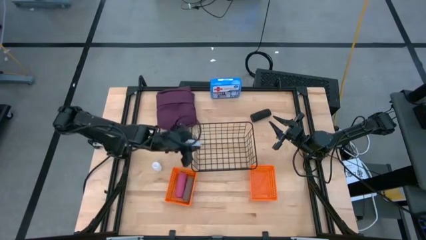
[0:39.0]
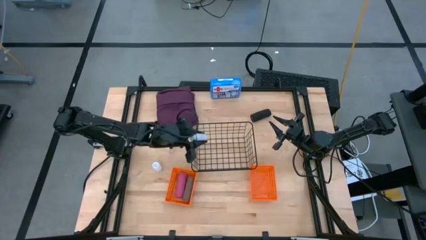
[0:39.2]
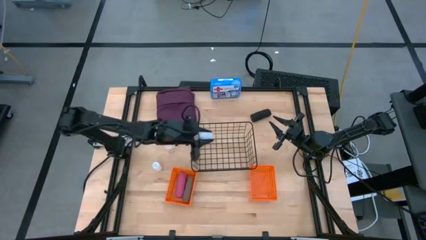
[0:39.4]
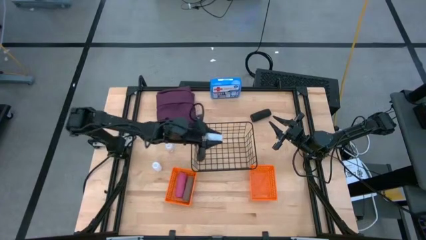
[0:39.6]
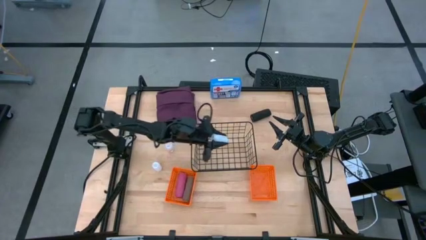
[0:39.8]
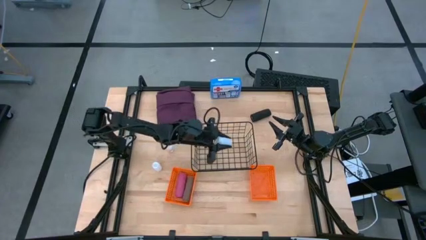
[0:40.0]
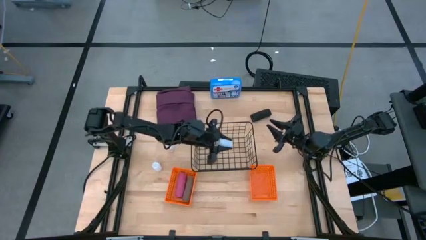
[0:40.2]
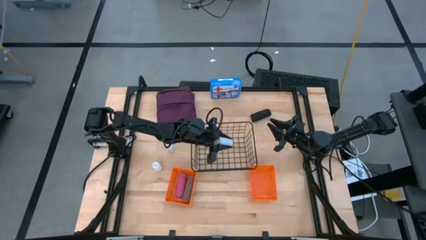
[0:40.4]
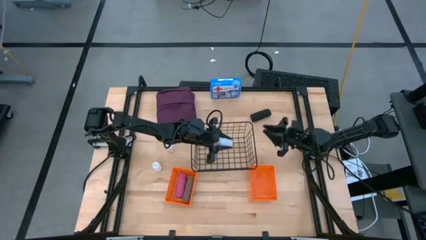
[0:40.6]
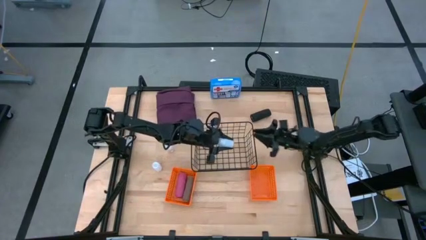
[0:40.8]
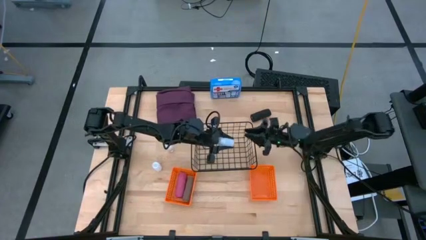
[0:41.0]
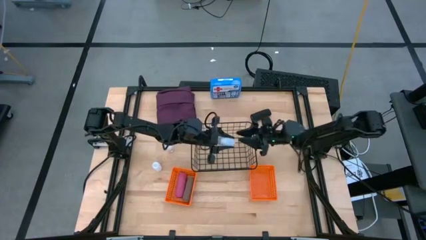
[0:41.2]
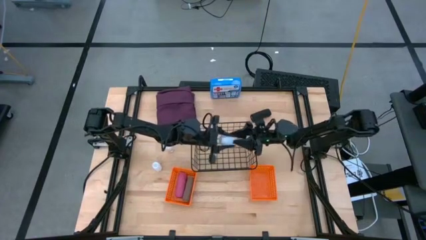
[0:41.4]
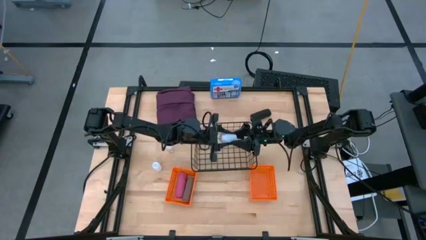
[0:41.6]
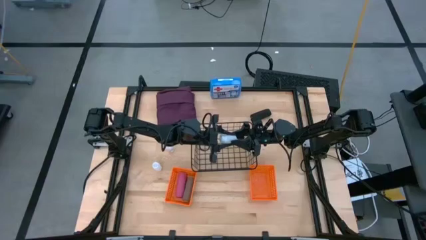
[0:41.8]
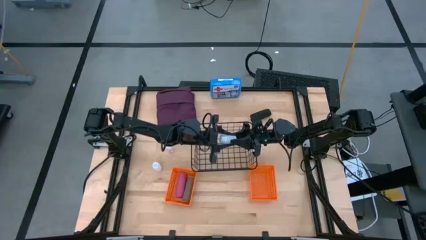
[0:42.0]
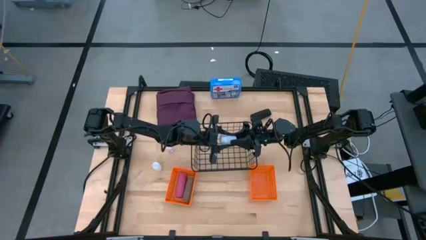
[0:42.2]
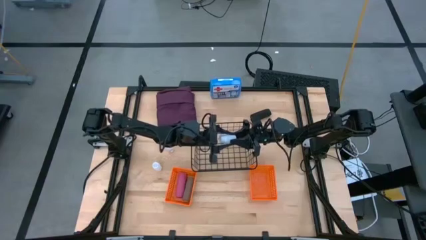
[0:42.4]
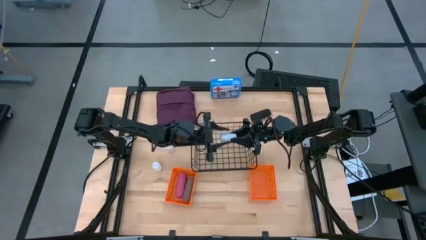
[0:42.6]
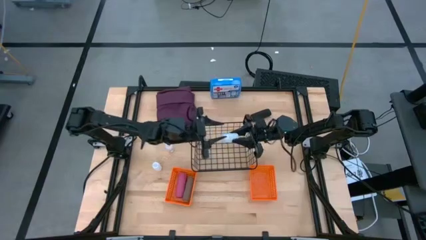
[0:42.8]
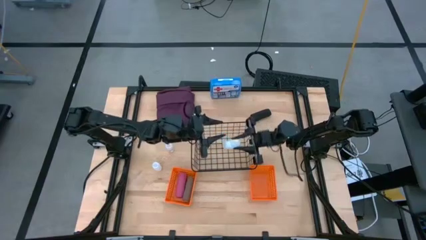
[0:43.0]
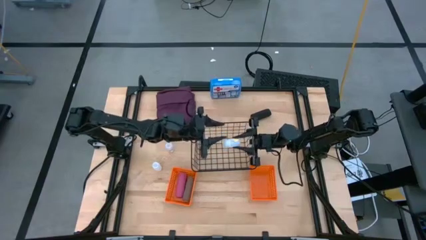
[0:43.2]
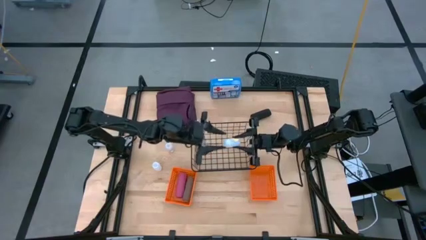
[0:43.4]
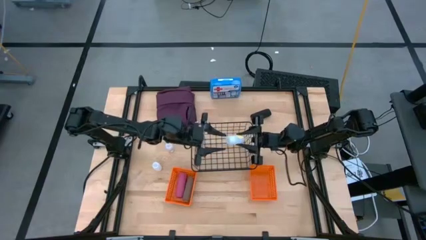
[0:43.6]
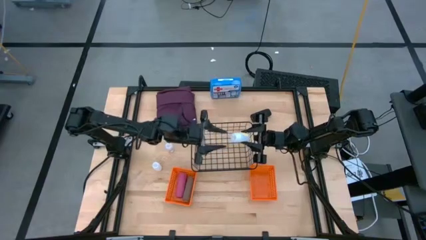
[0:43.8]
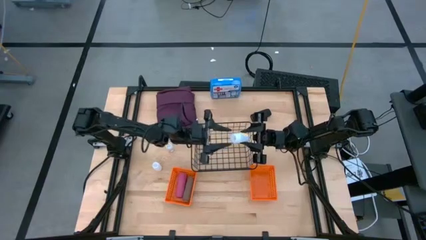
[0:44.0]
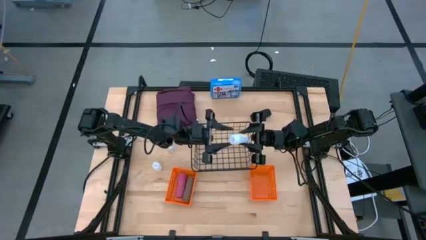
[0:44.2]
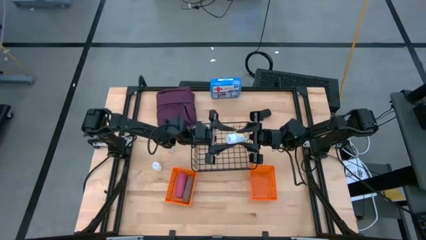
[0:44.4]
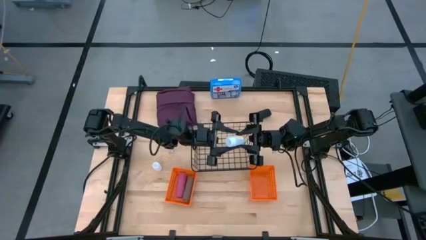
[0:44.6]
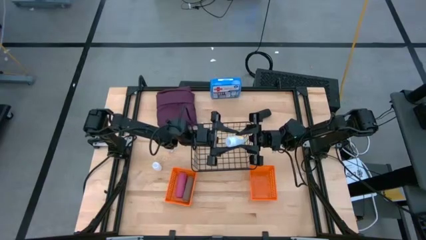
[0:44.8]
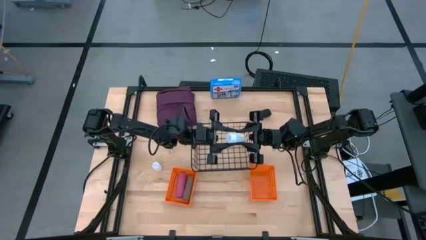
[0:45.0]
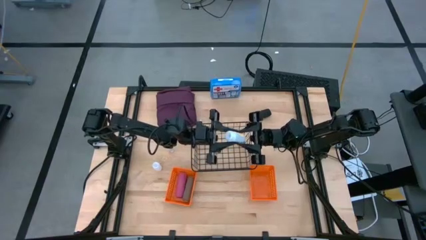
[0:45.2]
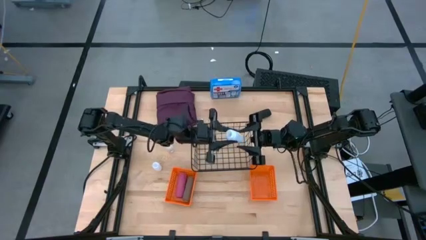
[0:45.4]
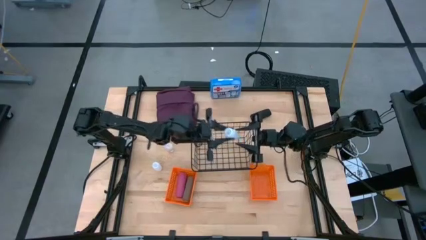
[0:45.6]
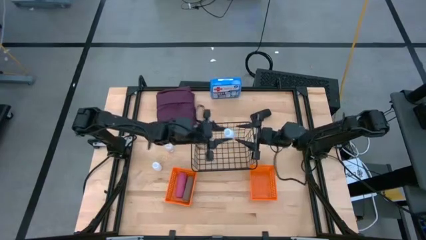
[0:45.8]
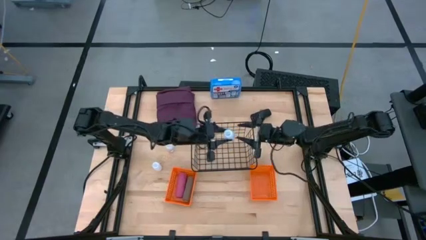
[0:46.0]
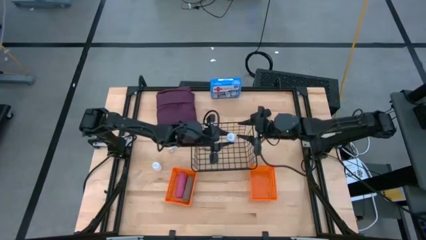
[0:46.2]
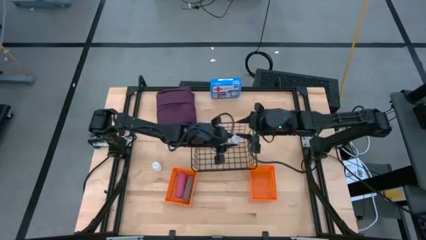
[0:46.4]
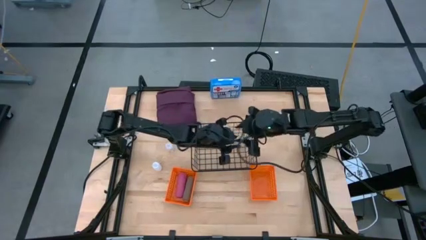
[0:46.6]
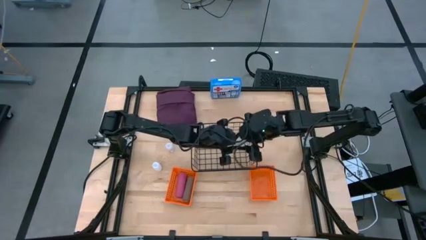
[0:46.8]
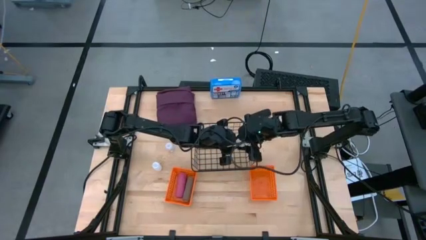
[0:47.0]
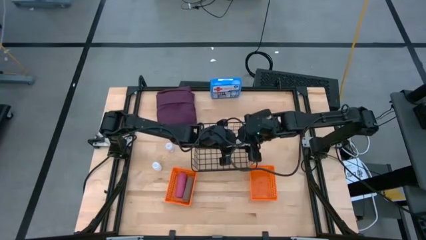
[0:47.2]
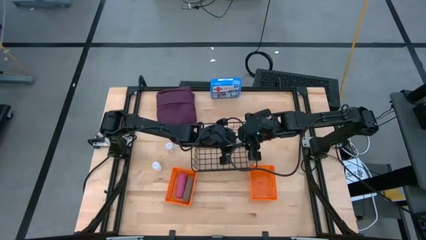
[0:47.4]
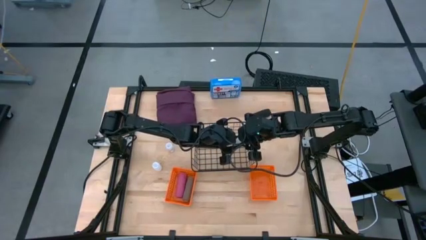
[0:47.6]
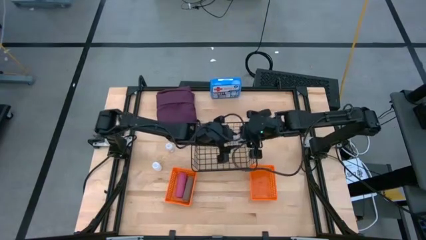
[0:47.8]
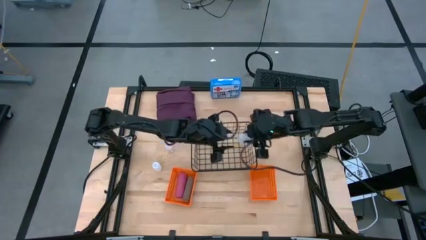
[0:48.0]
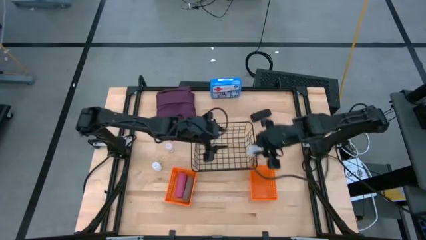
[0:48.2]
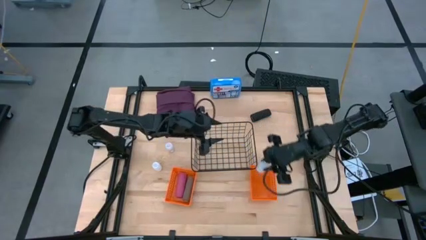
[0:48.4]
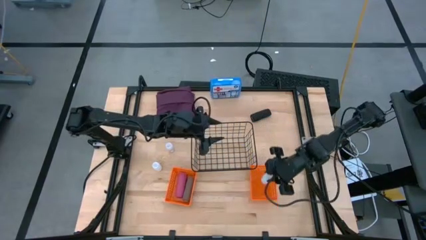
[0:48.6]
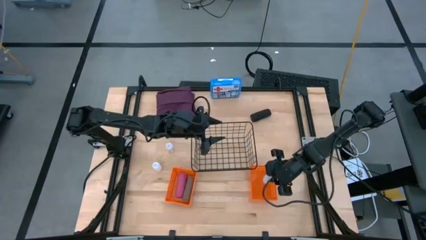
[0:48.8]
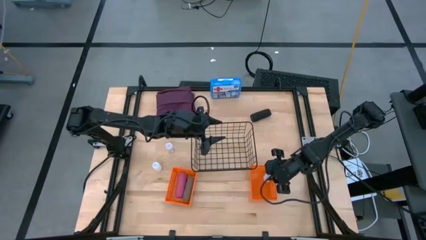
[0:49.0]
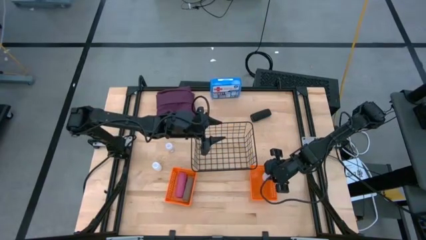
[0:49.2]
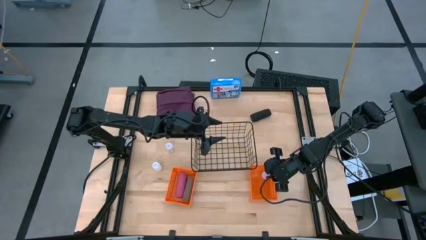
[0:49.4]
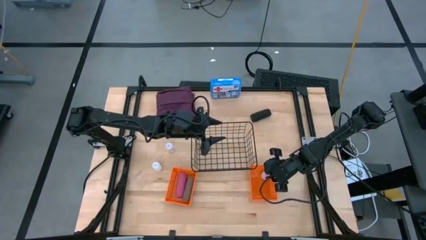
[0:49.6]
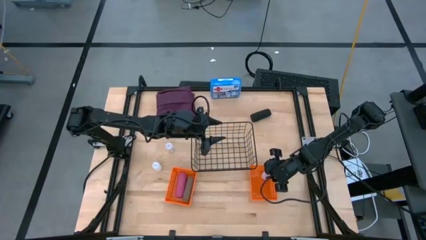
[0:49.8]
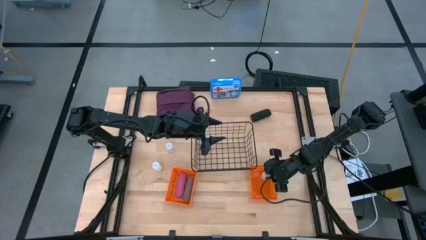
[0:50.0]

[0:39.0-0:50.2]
Task: Pick & Place Medicine items
Put the bottom white pill bottle into the right orange basket

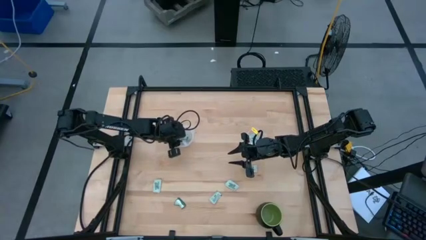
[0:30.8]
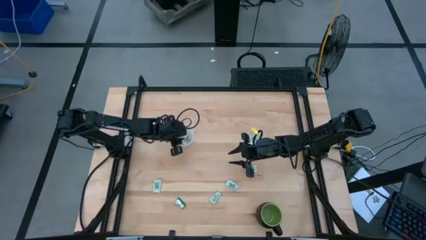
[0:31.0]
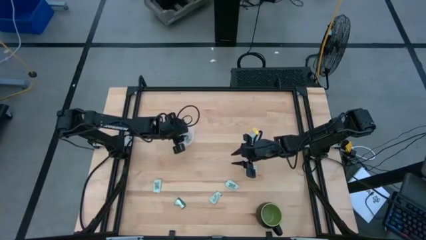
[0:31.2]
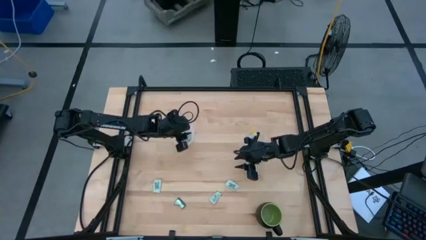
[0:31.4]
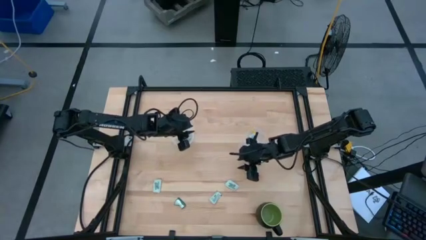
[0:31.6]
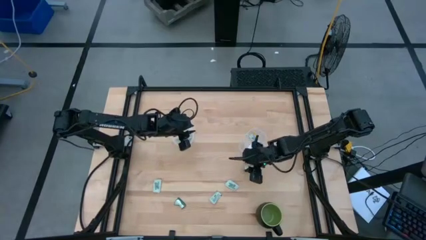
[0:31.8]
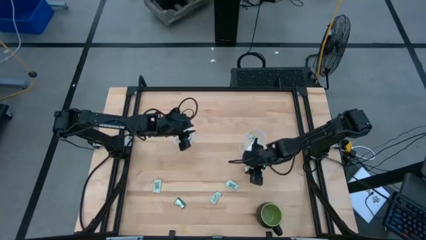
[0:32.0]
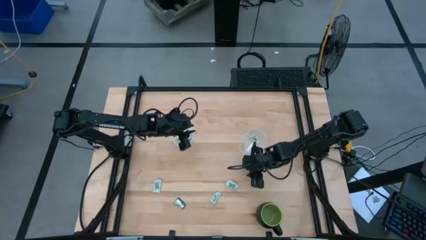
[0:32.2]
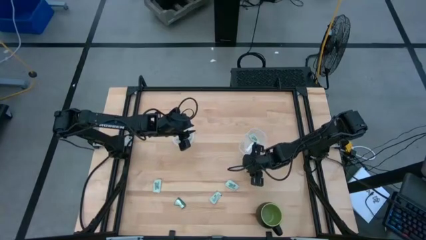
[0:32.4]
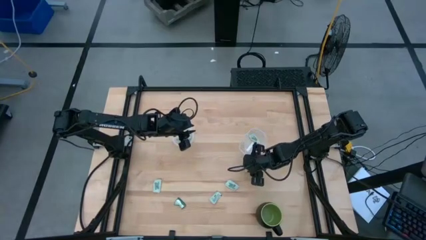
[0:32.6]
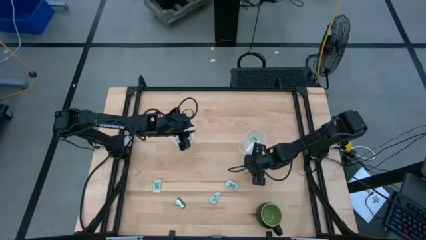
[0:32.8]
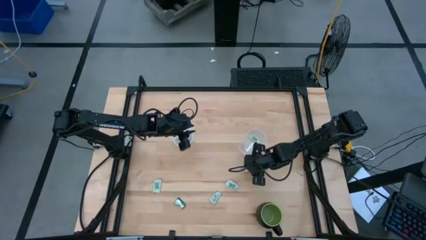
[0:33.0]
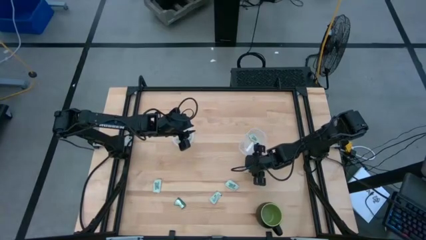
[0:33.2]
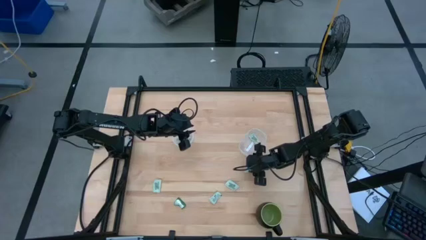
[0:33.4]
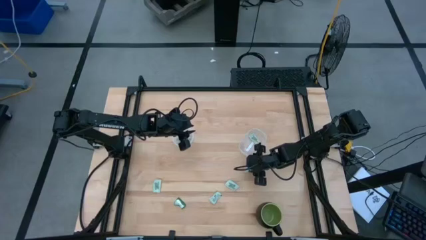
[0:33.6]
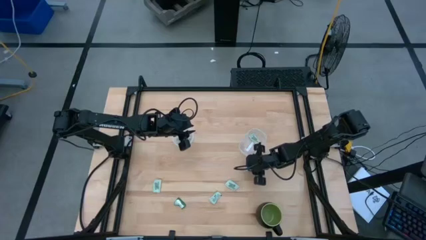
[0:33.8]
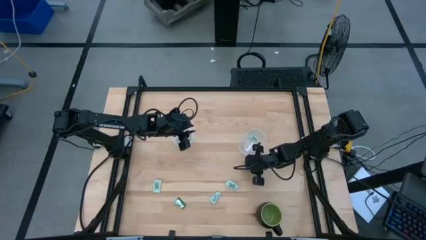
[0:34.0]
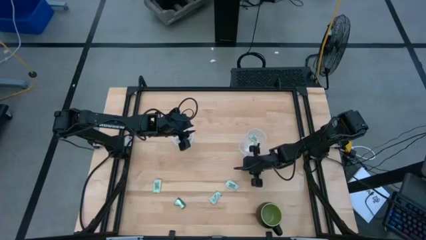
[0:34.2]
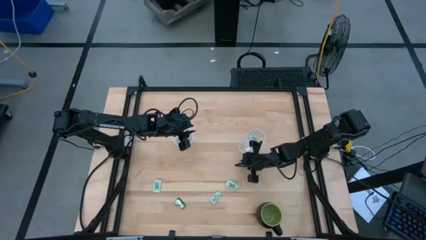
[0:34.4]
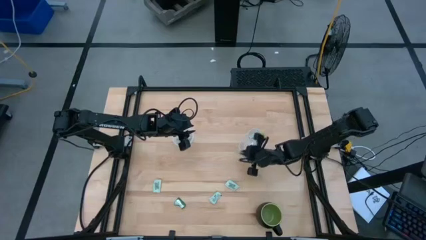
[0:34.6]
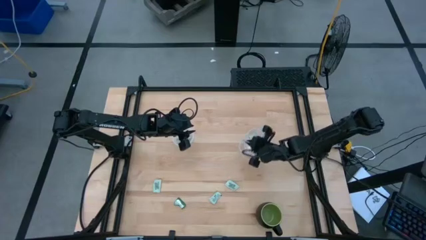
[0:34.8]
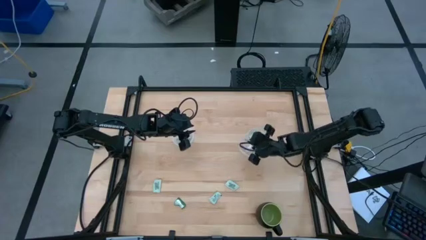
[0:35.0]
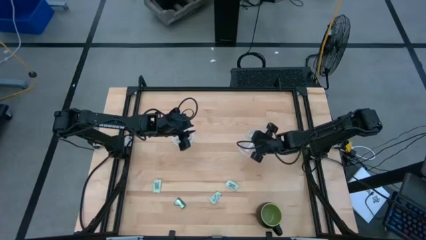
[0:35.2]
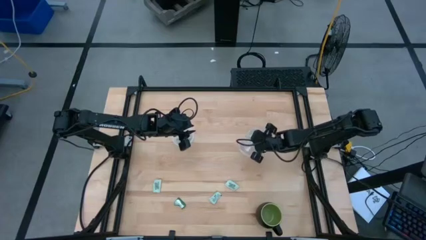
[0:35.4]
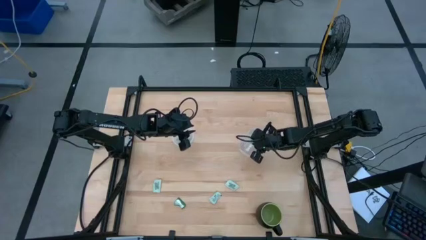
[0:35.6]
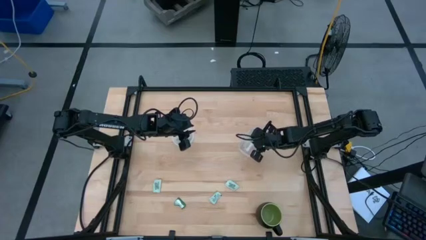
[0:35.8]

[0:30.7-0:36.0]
Task: Pick and place Stevia / Truvia into bins
Put the white stevia packet into the right transparent container
